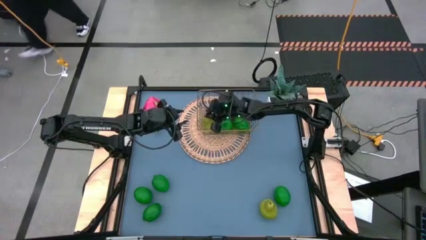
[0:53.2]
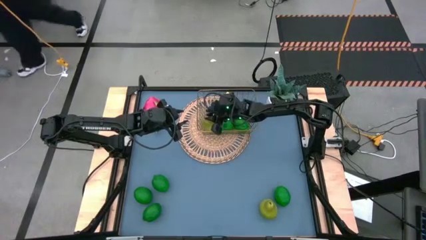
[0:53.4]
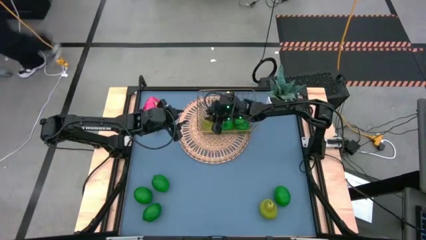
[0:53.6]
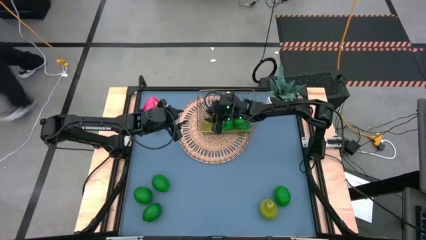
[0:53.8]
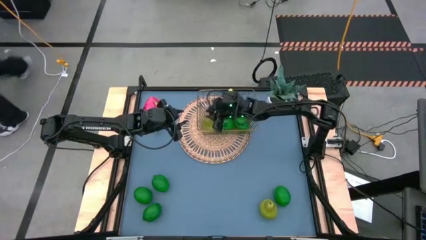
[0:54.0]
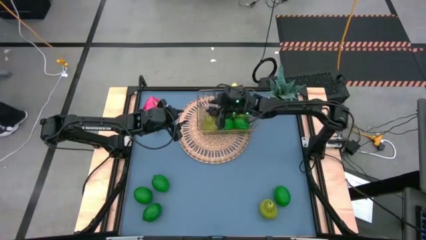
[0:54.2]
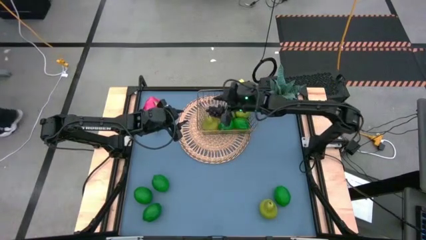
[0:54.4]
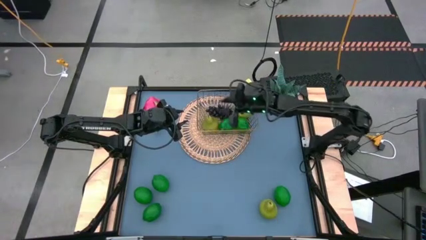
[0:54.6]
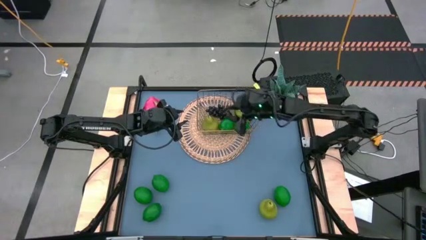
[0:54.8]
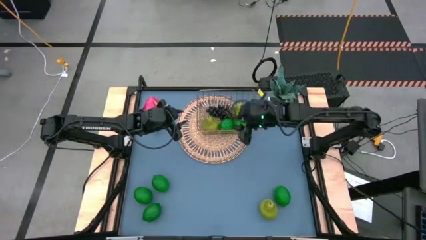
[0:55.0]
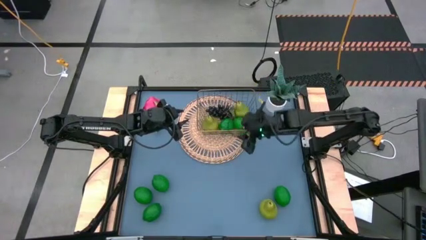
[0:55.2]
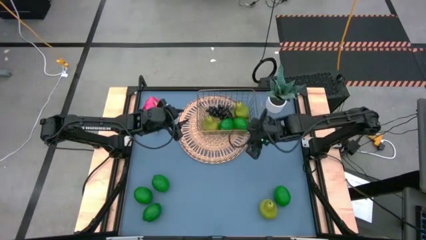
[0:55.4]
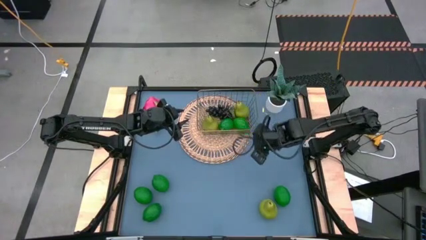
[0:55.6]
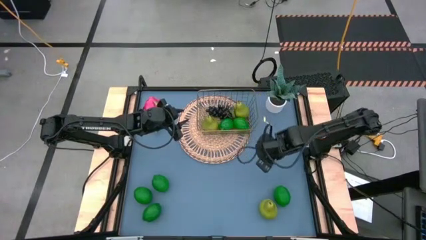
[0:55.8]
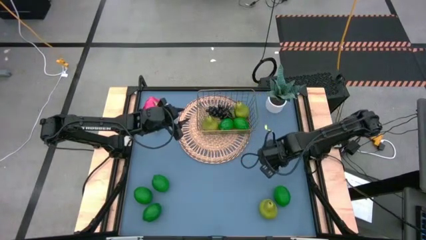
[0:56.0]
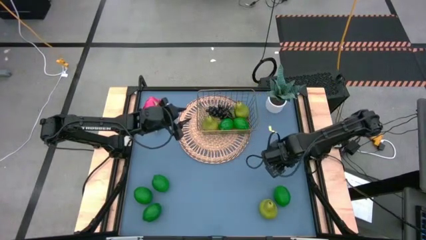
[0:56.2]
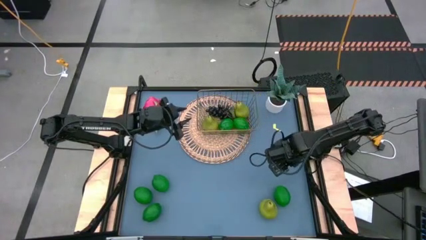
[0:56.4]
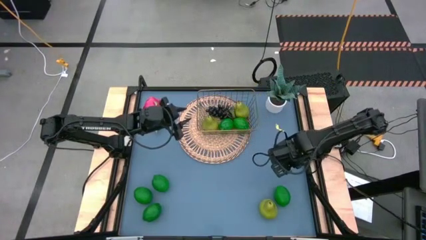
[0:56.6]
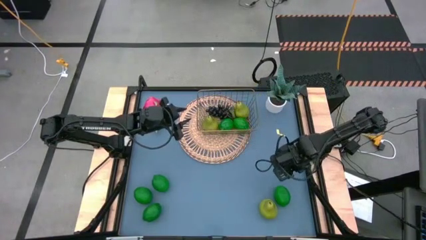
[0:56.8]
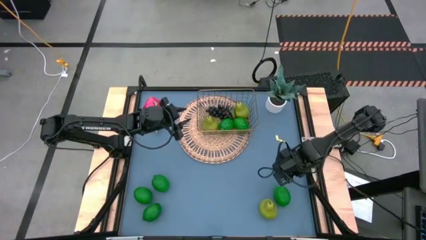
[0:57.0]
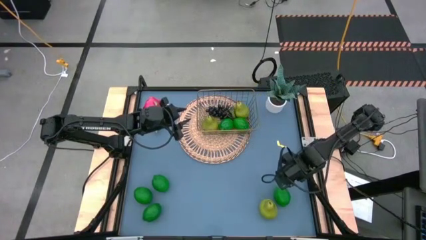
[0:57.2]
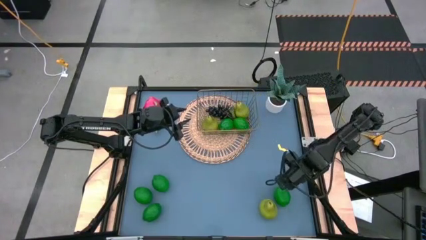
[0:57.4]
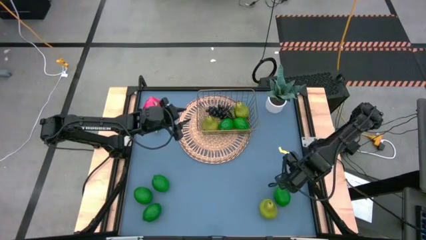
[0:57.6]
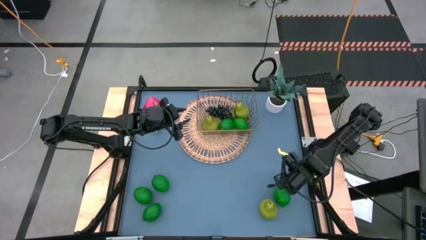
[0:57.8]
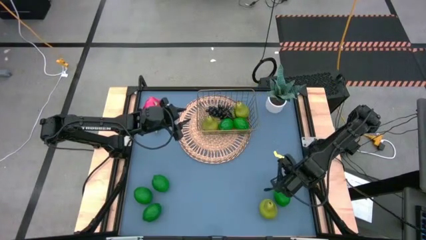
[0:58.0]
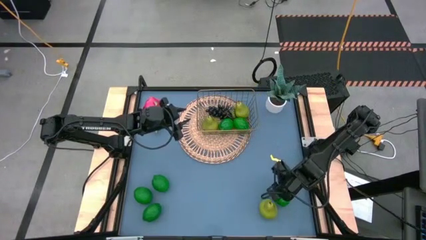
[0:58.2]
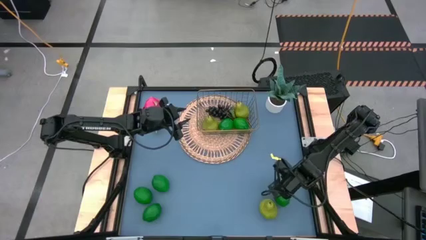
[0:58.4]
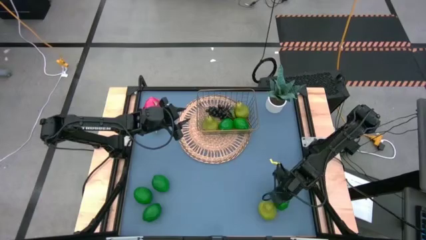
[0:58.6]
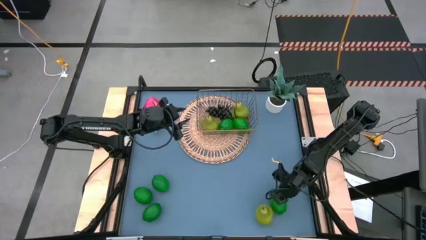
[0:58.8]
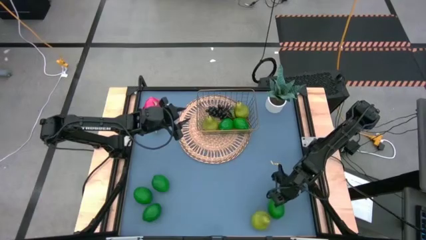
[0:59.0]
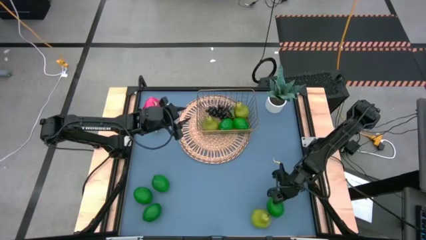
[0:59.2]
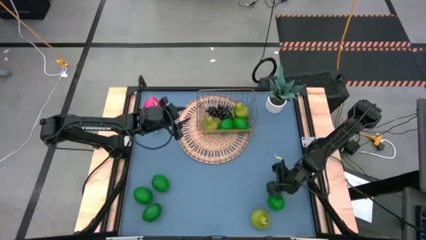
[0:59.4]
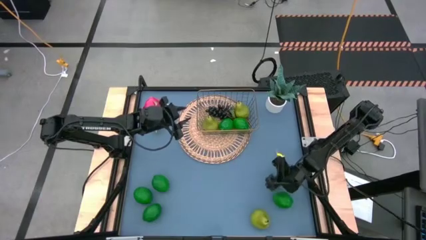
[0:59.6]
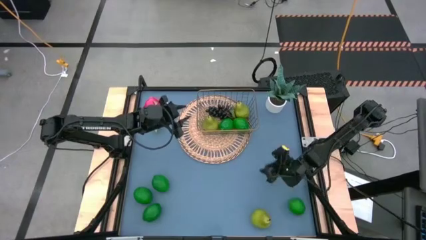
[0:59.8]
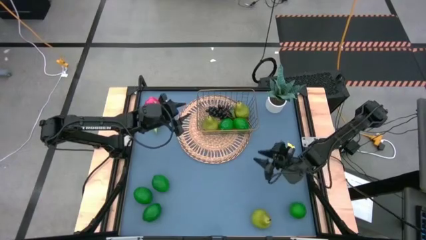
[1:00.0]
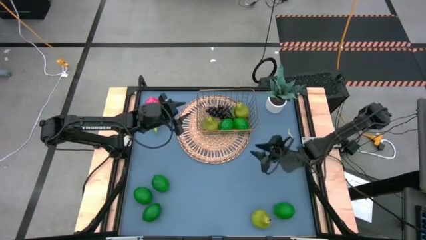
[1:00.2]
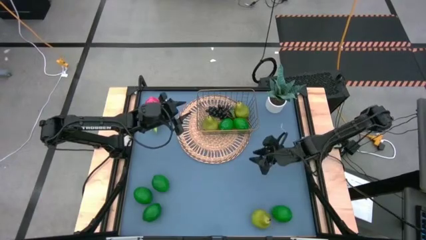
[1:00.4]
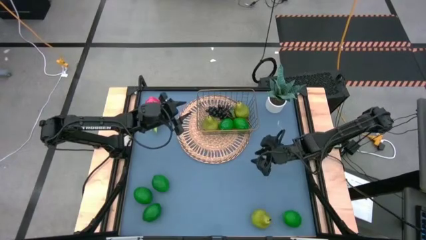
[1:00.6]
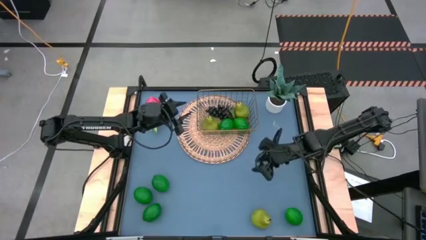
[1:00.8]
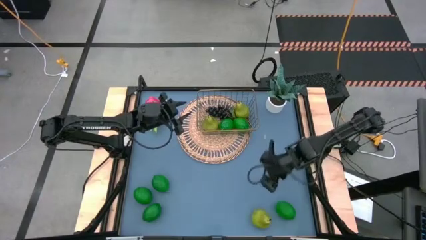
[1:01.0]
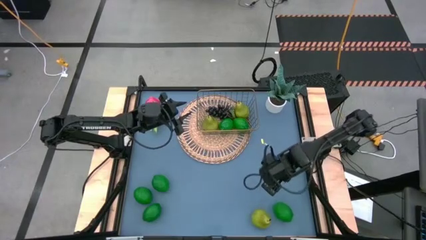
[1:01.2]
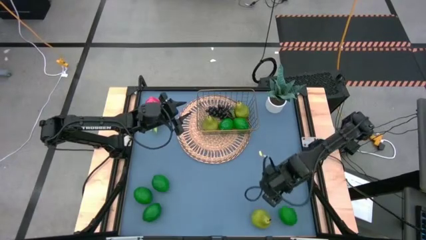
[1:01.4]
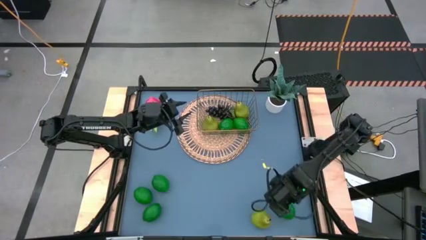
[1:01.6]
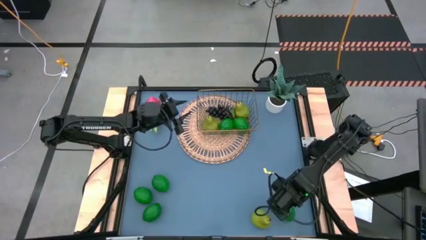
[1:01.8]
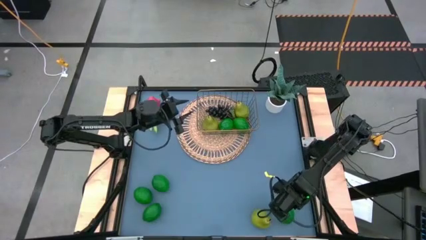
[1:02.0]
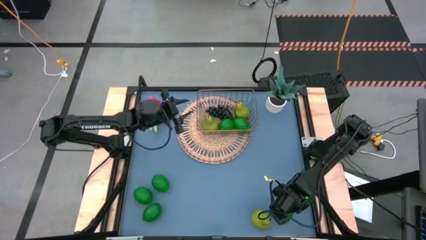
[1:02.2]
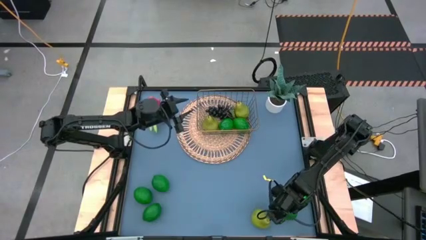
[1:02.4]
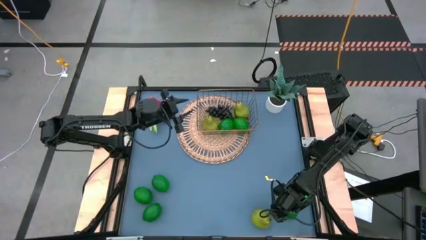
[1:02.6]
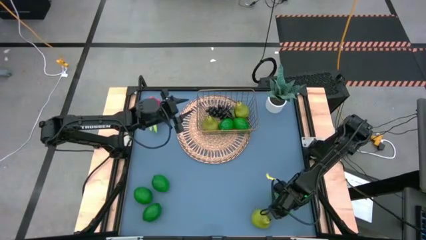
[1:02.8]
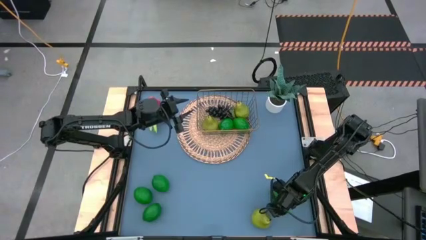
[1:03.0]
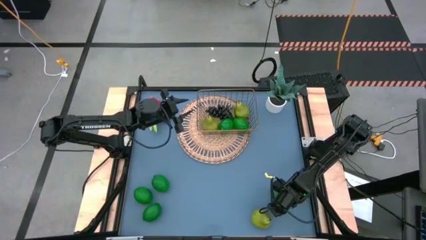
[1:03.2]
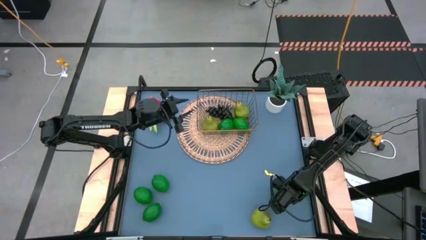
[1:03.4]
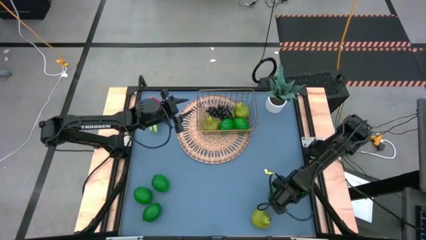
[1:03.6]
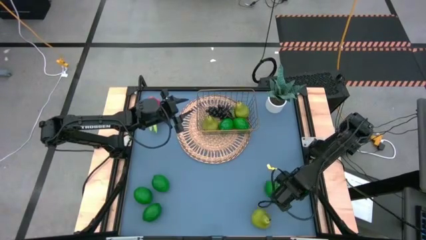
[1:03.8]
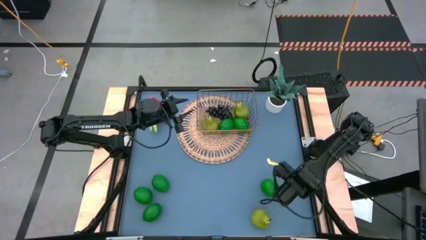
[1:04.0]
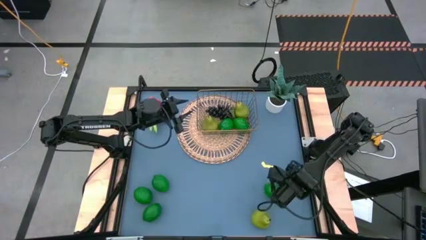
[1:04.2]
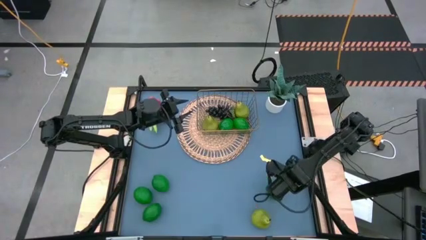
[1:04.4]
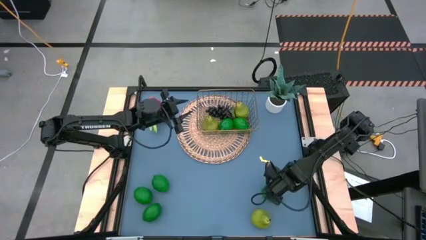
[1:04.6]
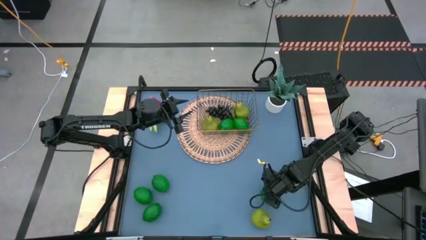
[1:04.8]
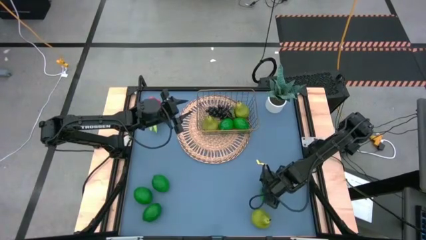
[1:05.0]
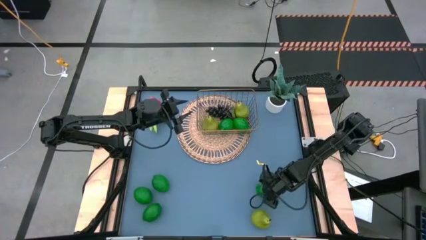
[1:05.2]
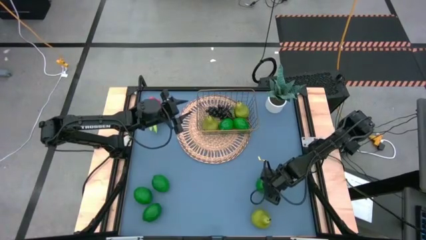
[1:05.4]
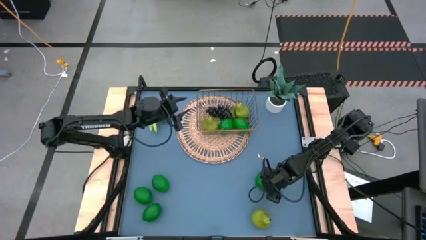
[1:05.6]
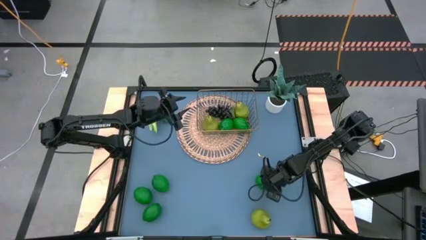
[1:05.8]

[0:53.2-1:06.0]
Task: Build produce basket
Put the green lime into the wire basket

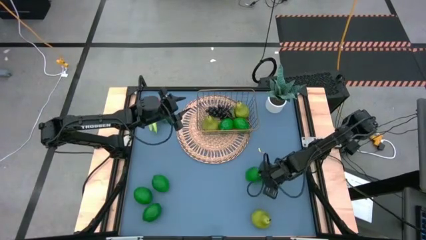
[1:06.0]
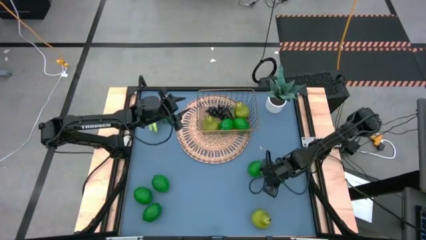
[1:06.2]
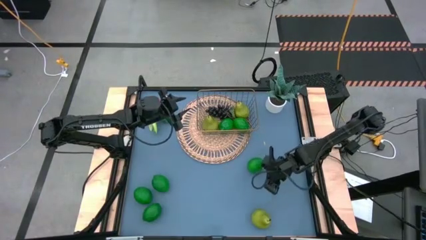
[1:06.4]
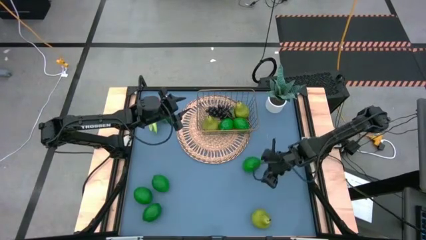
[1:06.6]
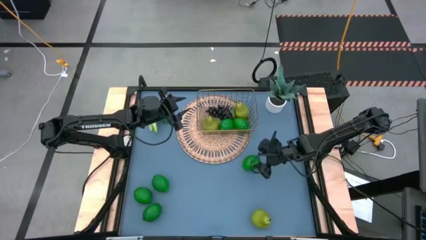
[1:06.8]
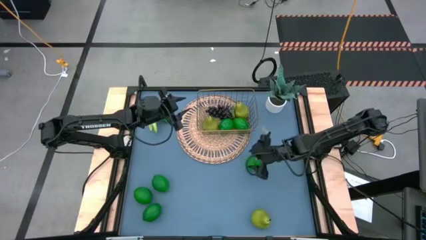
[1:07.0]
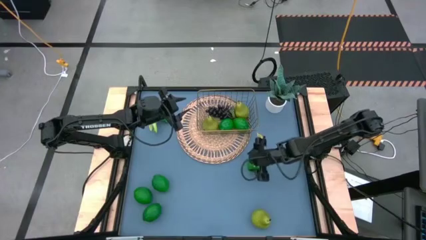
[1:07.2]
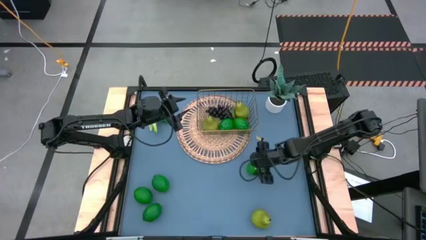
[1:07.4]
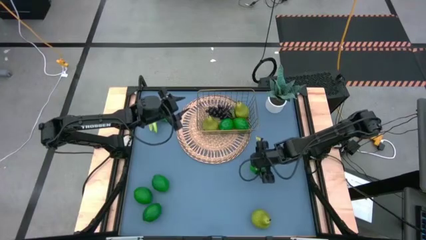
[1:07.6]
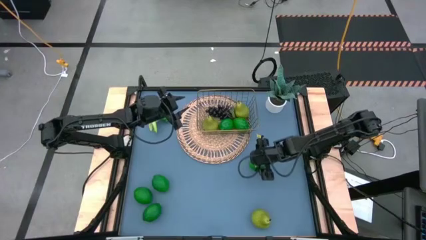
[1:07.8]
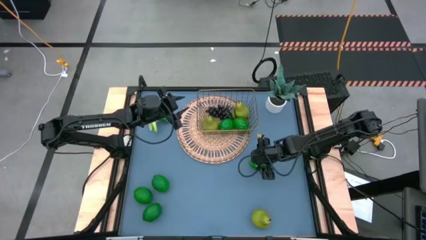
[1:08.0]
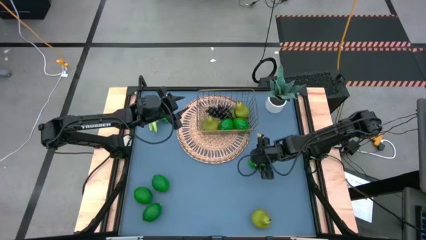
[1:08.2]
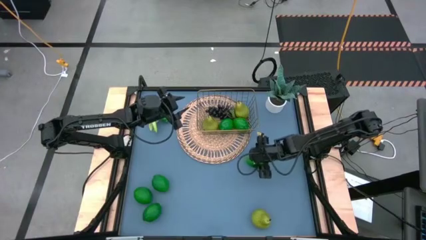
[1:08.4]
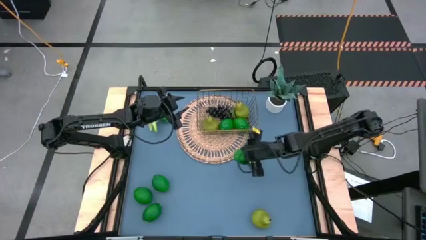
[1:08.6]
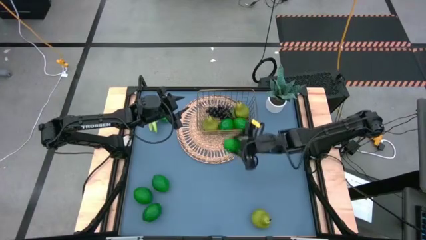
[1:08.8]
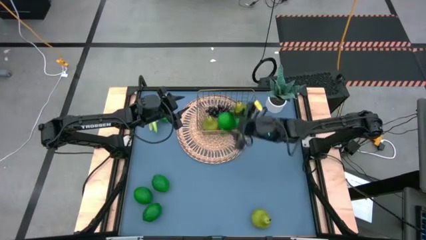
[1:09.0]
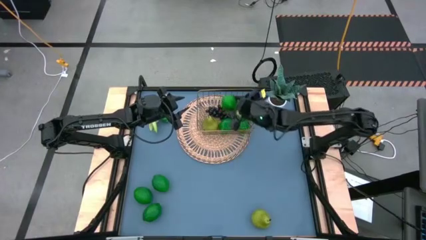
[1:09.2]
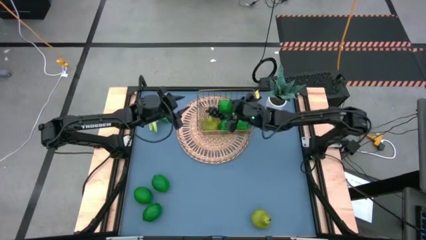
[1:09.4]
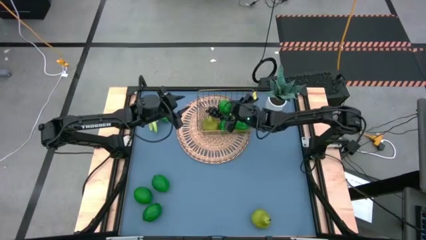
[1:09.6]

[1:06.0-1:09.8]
Put the green lime into the wire basket
